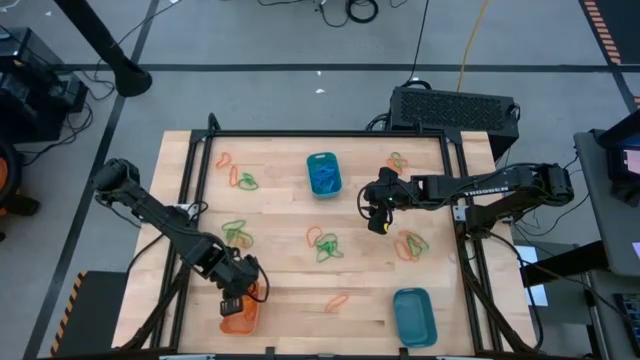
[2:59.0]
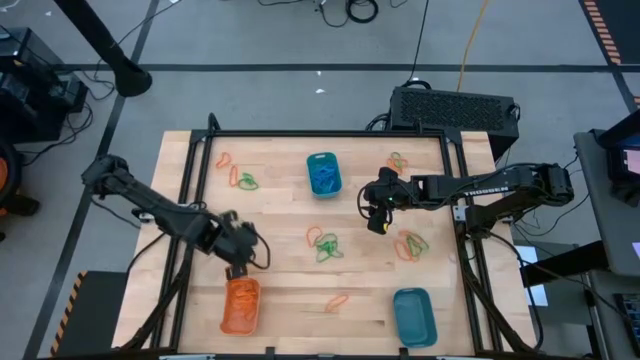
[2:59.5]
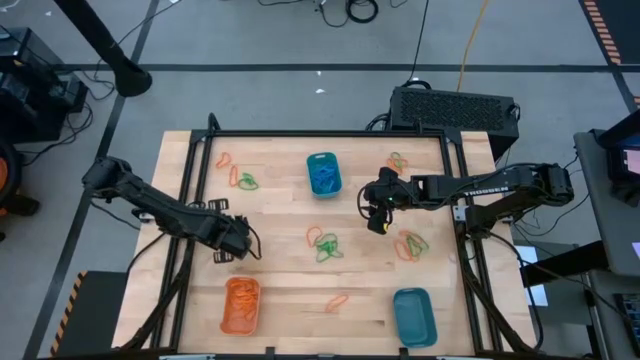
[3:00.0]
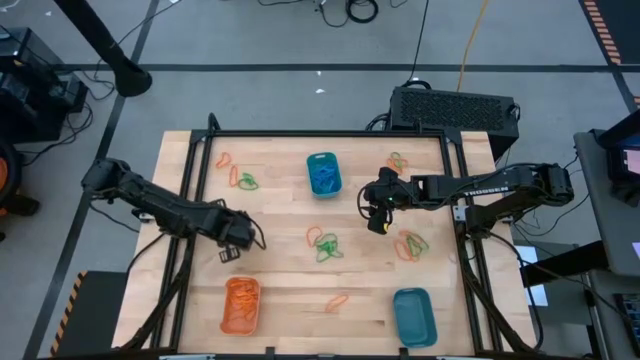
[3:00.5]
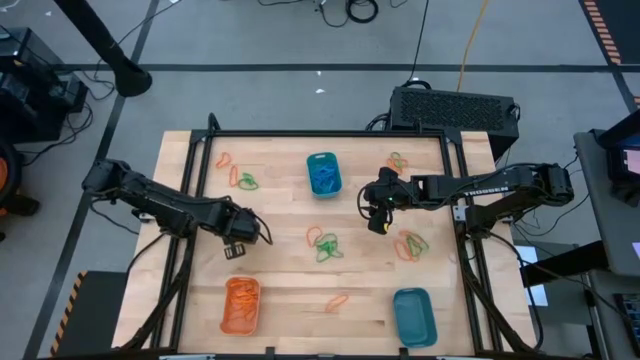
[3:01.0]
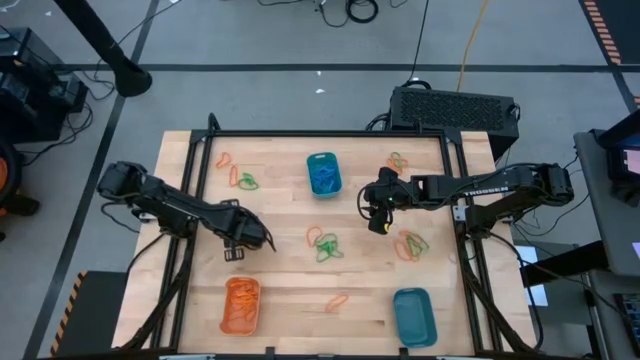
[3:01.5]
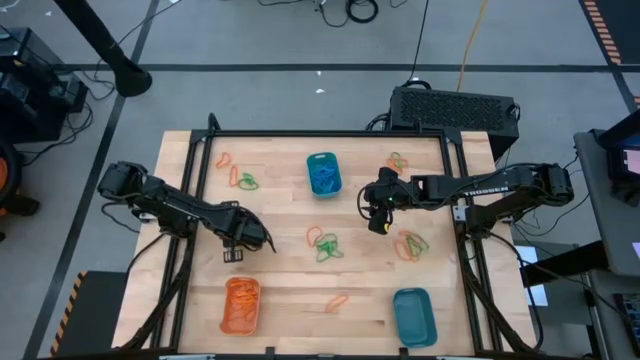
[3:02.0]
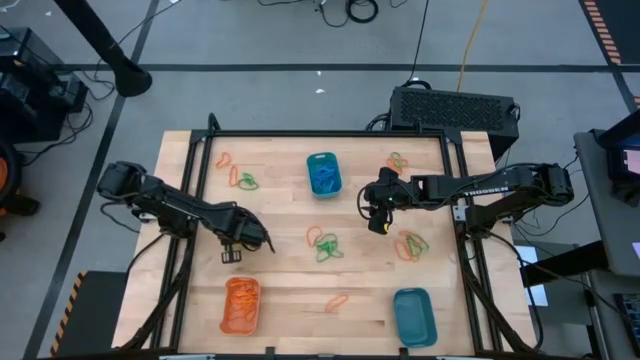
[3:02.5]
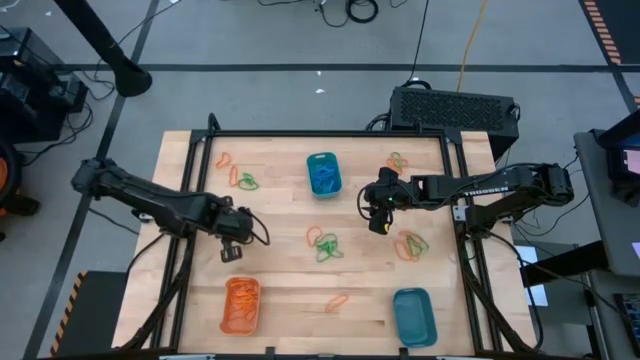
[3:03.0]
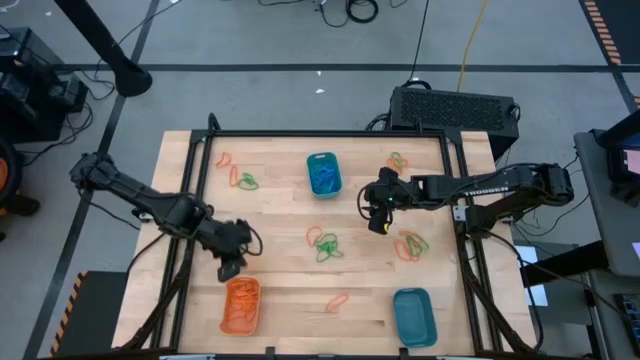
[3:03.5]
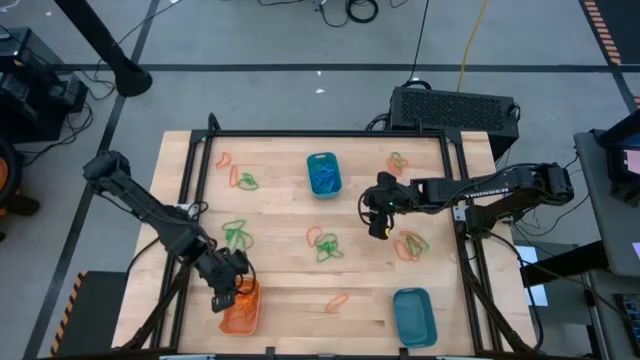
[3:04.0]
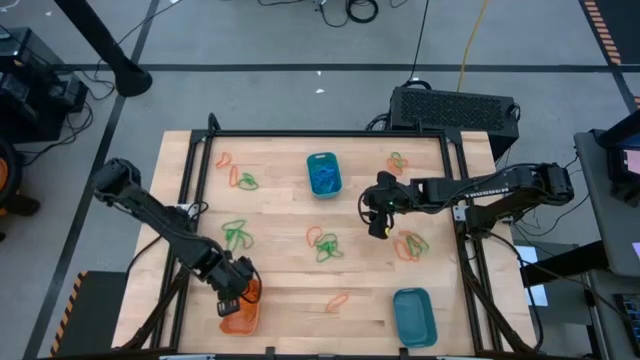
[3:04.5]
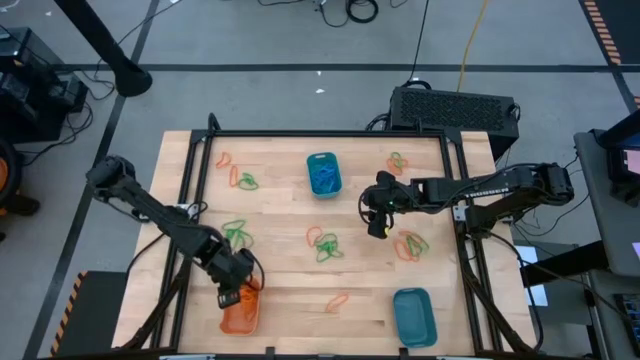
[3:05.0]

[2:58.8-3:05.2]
Task: Sort rubber bands into baskets
Put the orange rubber band into the orange bin

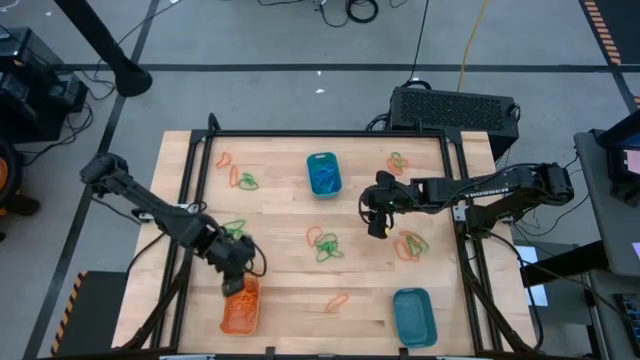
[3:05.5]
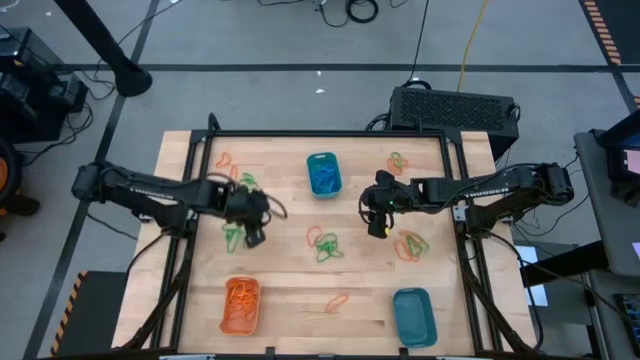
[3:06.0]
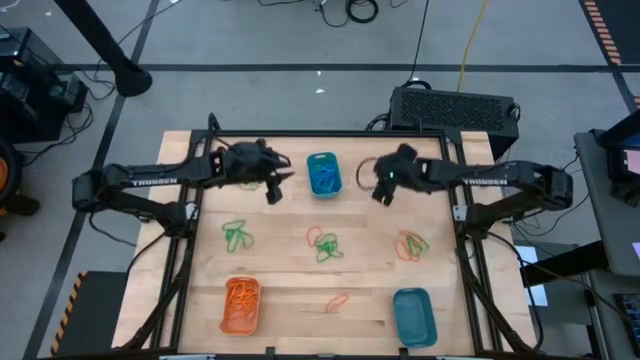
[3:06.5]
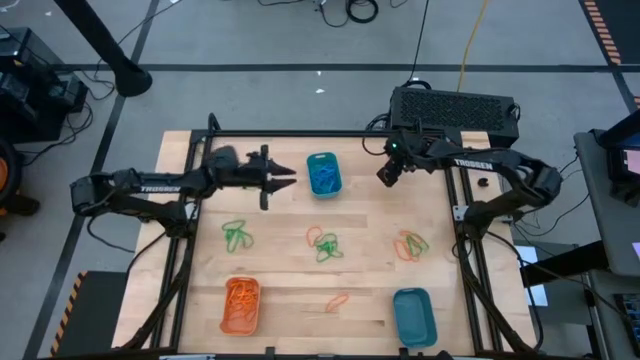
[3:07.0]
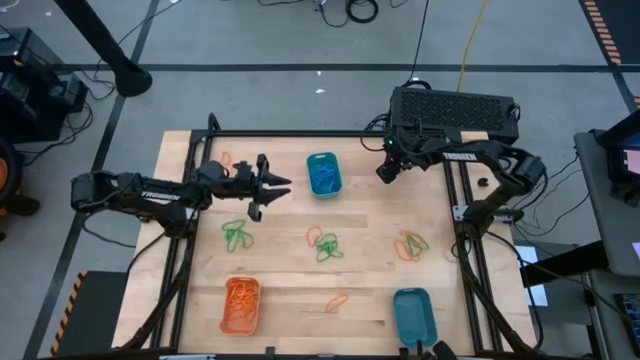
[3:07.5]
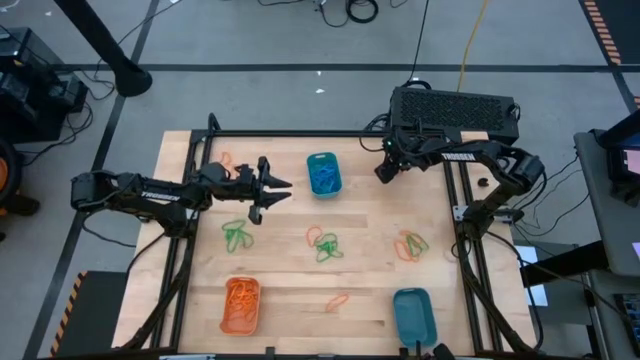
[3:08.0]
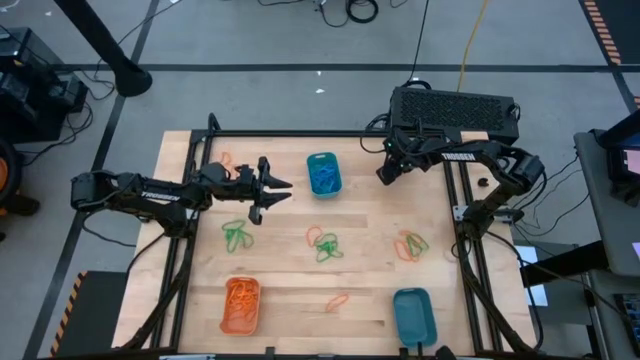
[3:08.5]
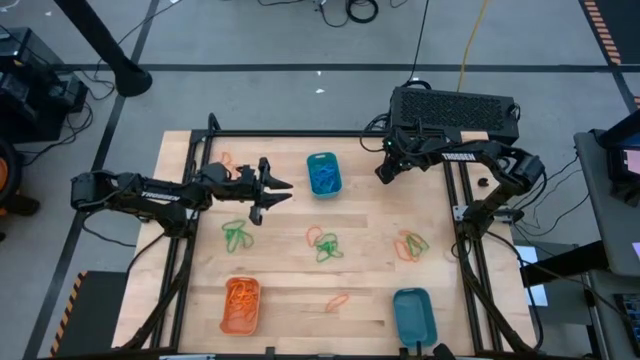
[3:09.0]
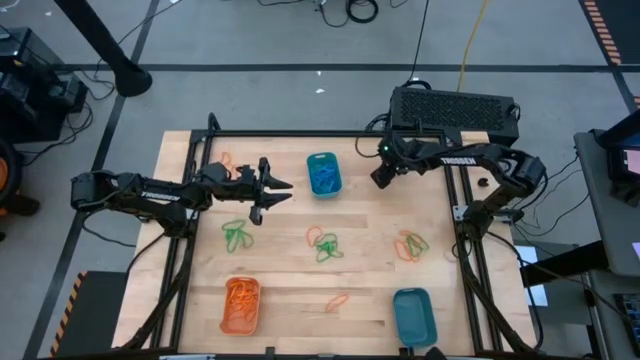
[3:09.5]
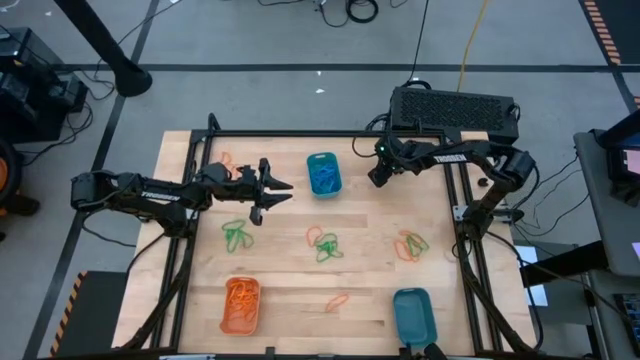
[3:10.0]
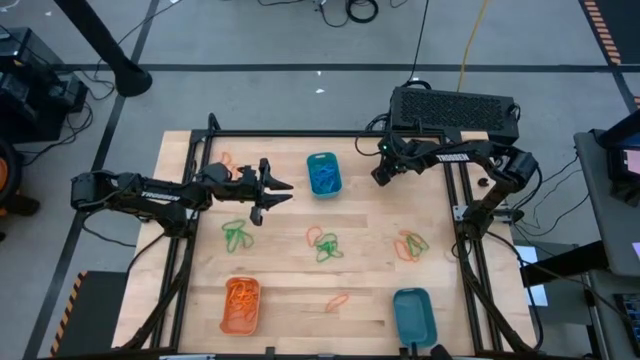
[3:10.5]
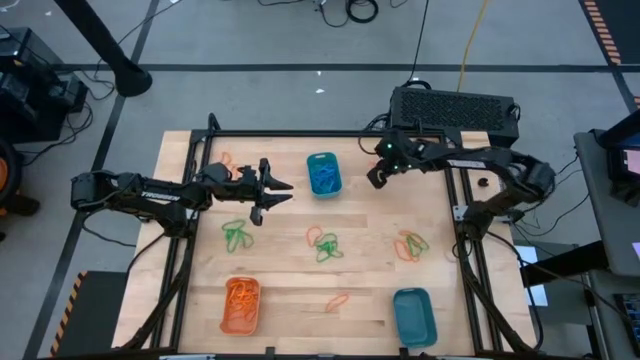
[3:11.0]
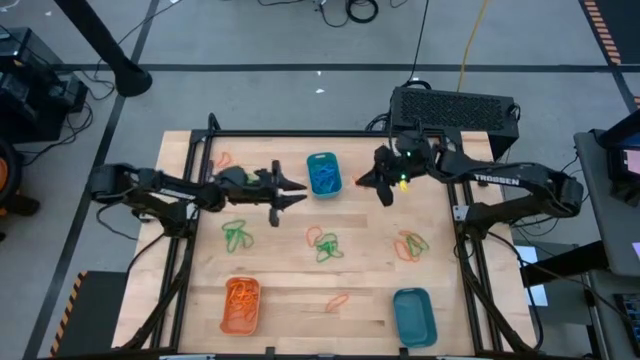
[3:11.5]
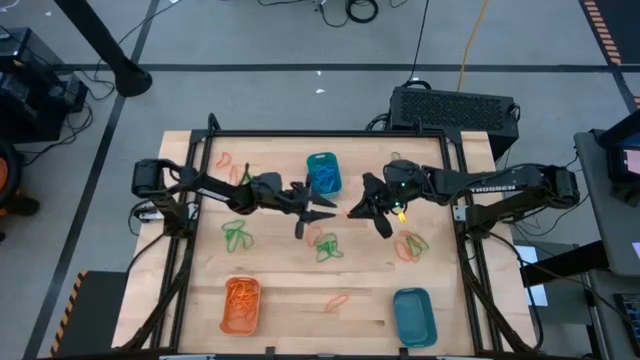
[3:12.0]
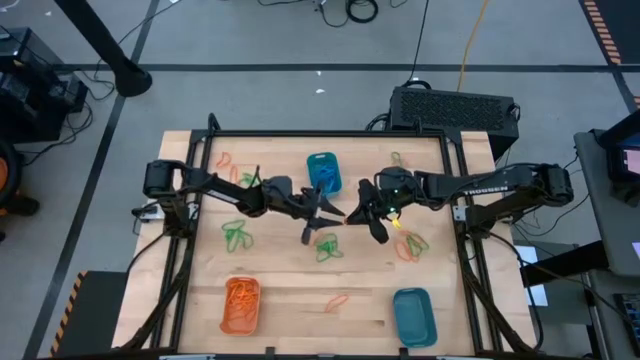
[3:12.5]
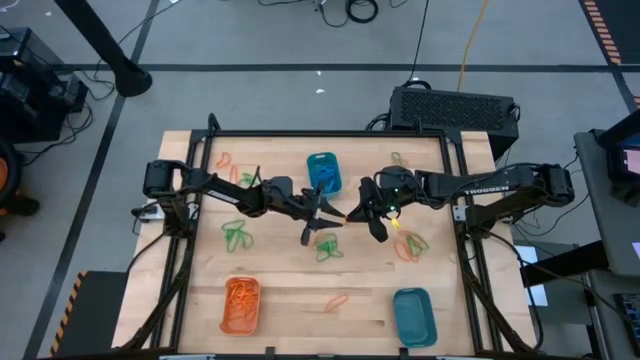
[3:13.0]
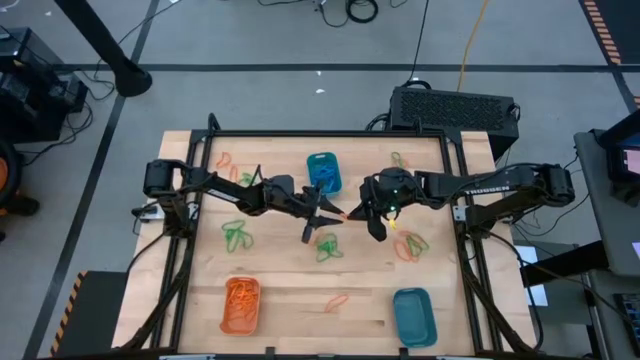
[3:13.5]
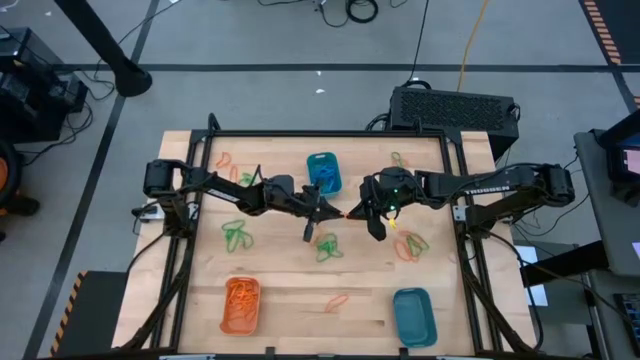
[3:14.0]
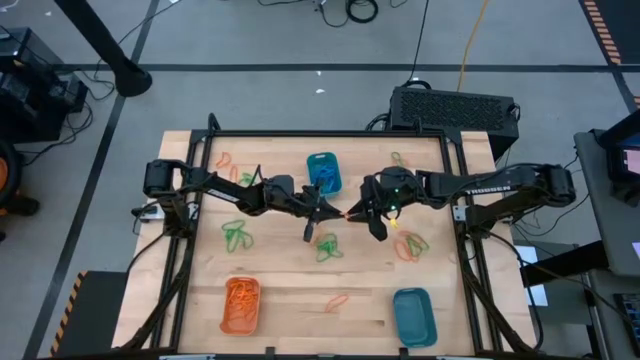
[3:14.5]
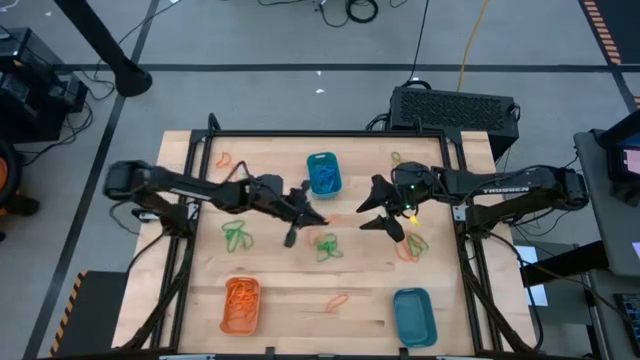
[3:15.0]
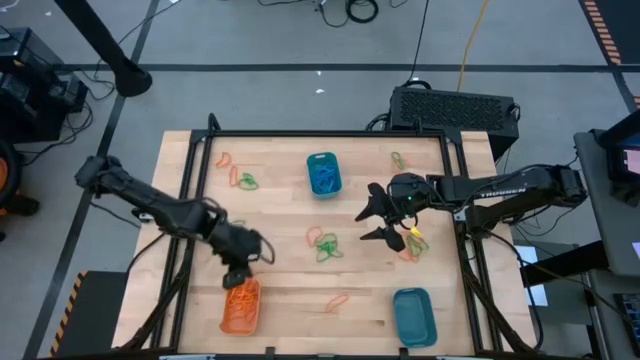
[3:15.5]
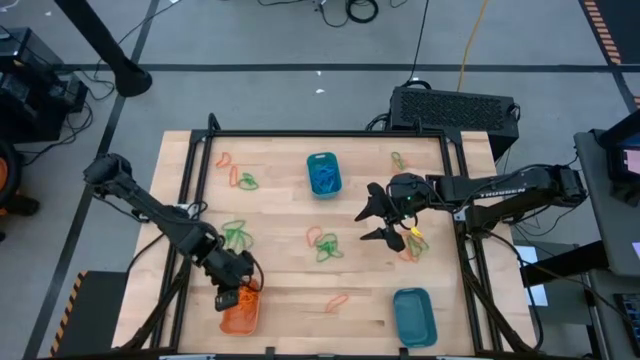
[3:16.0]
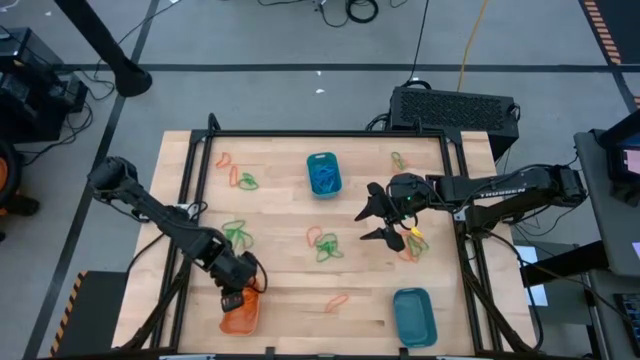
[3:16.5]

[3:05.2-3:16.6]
Put the orange rubber band into the orange bin

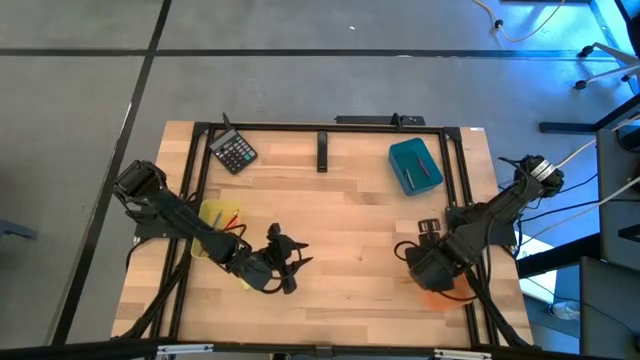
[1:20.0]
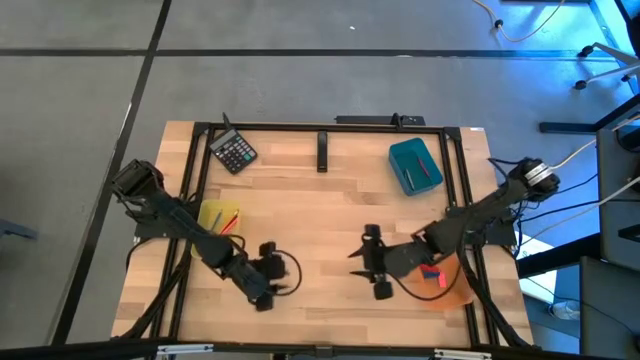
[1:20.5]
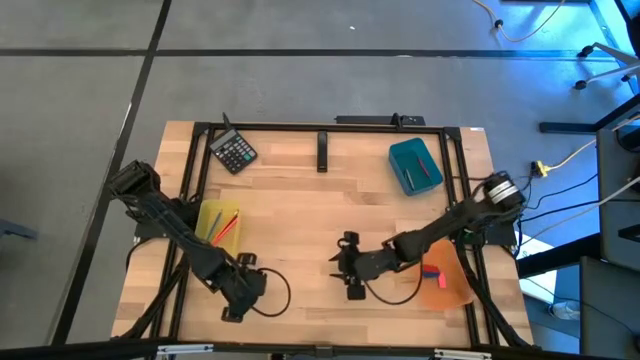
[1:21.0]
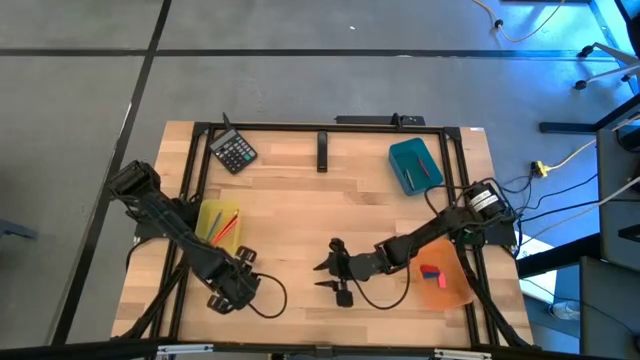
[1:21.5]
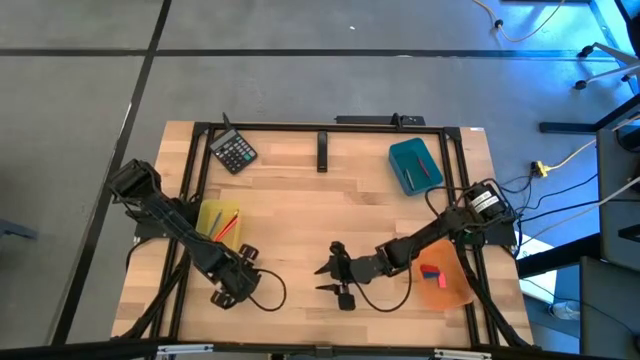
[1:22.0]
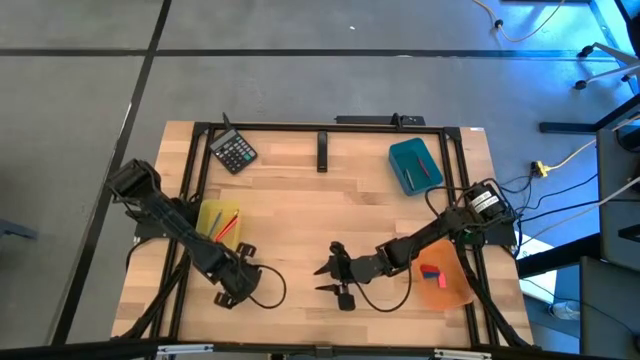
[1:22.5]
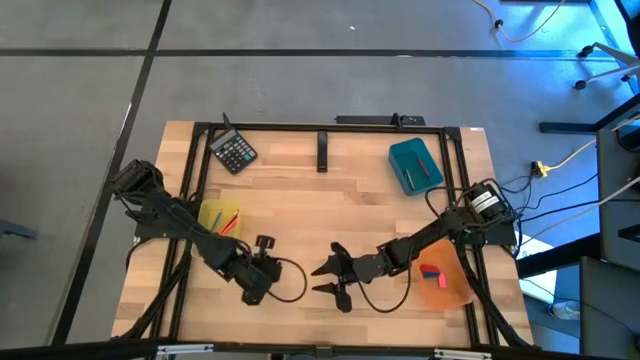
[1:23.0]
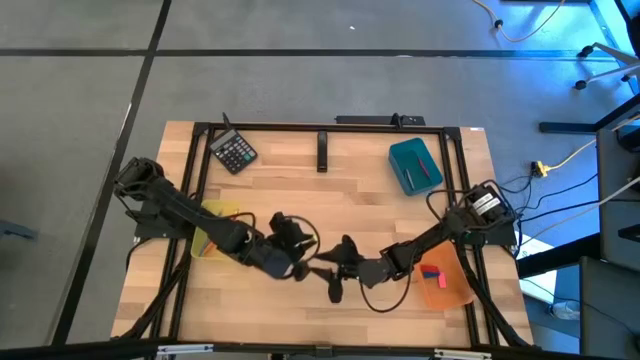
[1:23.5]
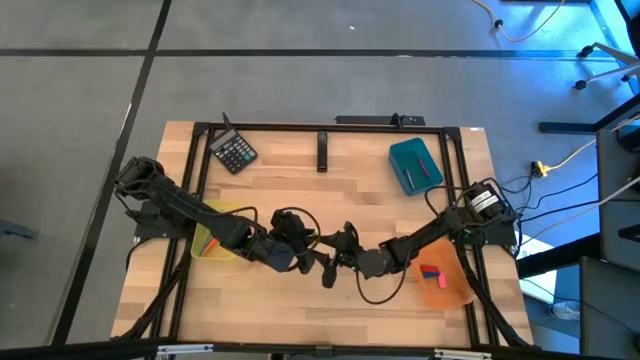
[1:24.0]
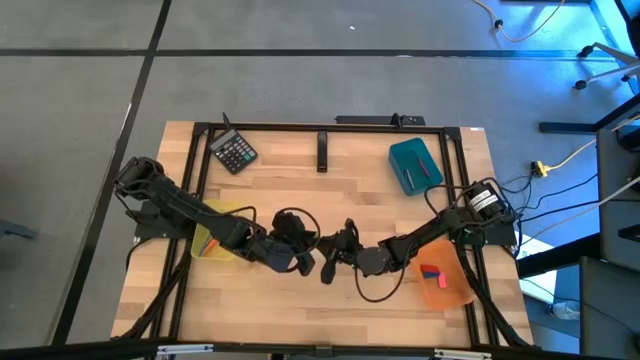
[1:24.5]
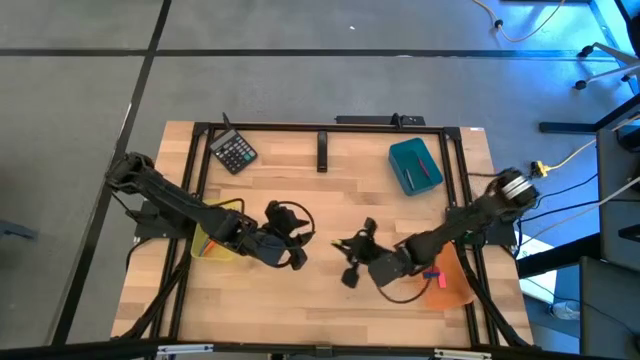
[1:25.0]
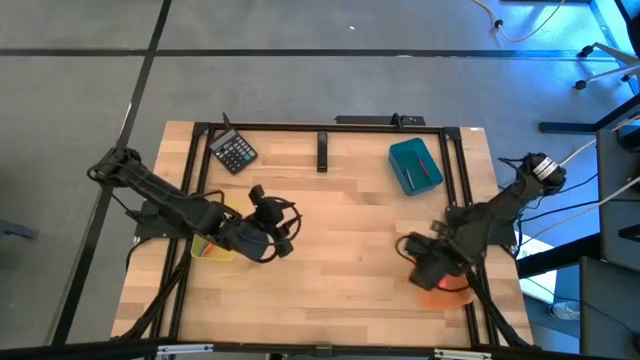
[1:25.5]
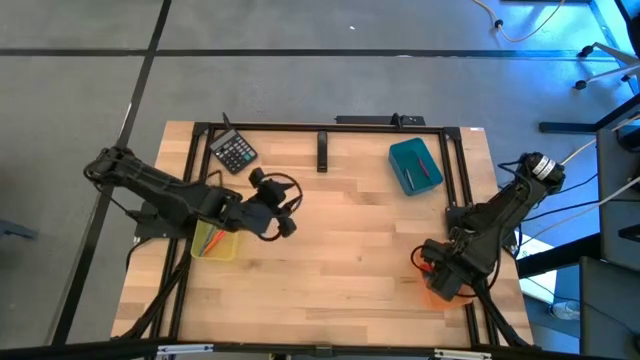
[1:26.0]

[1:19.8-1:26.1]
Task: Sort crayons/erasers/pens/pencils in bins
Put the yellow eraser into the orange bin
